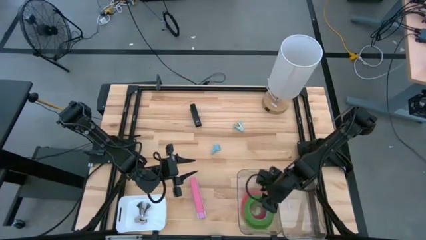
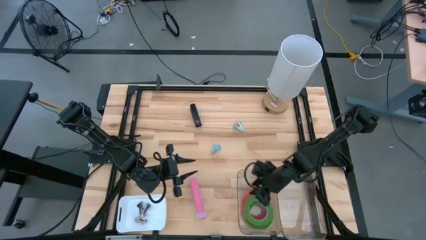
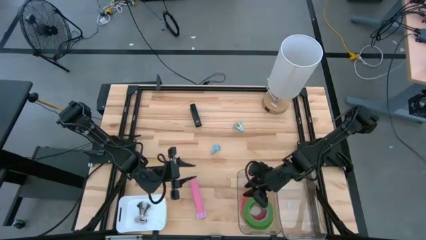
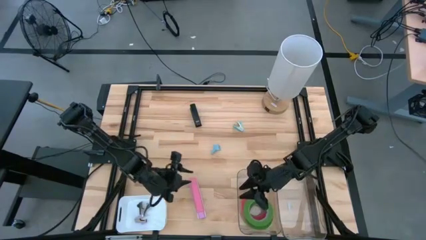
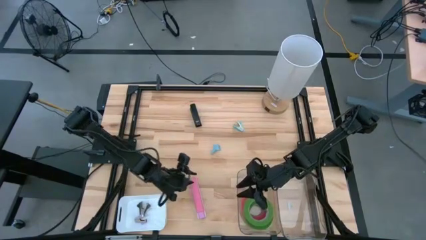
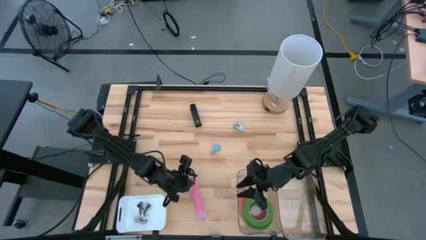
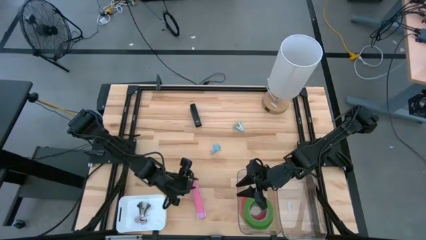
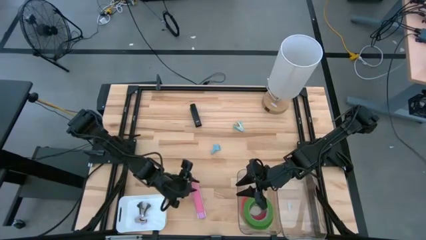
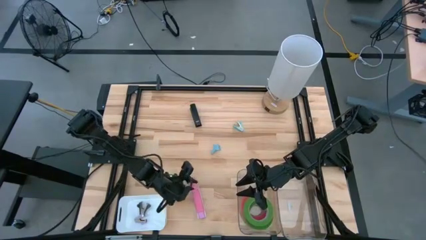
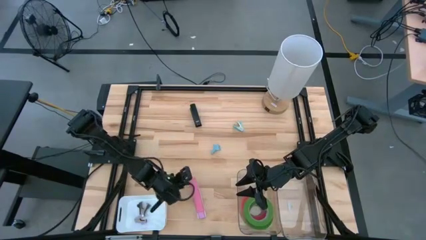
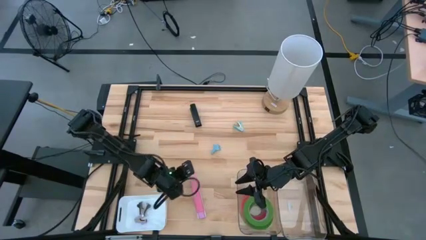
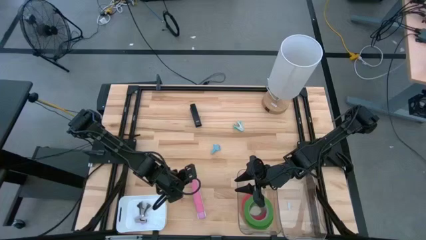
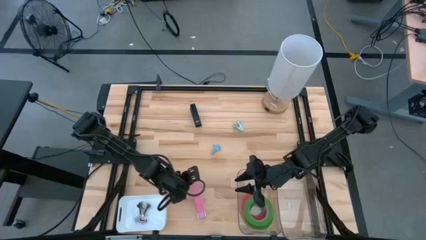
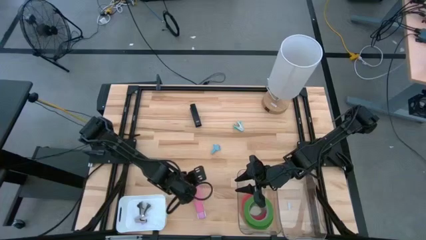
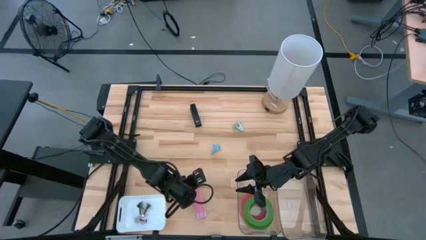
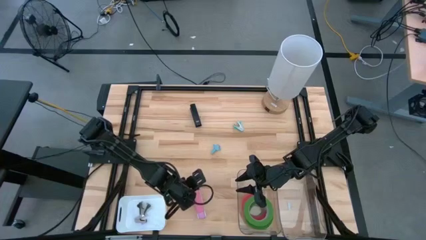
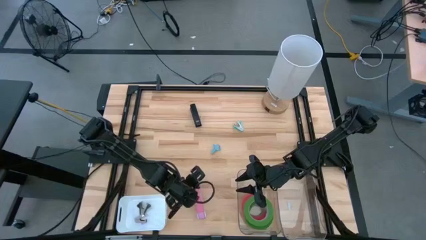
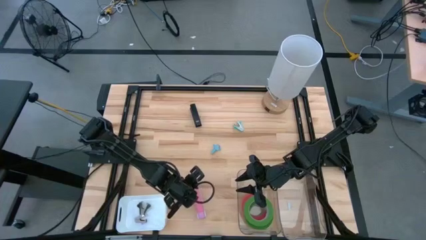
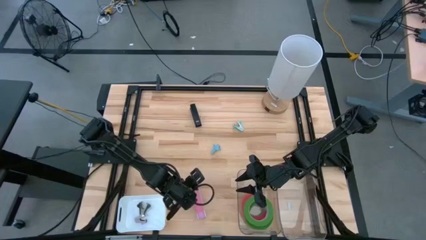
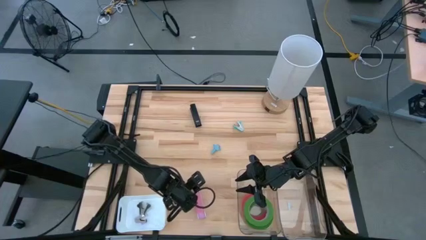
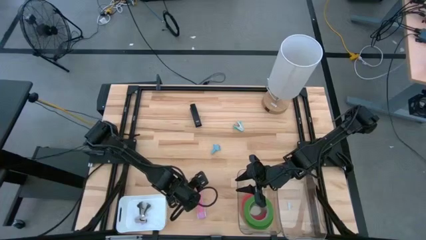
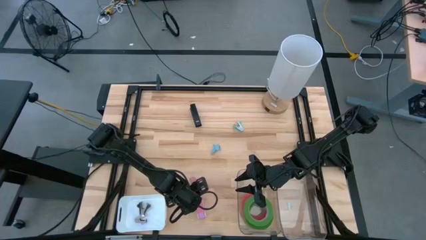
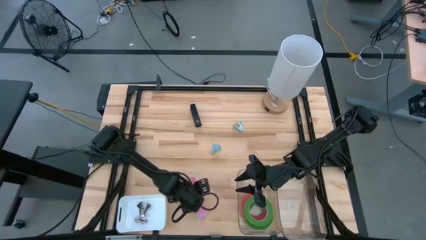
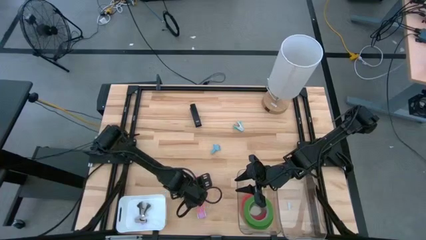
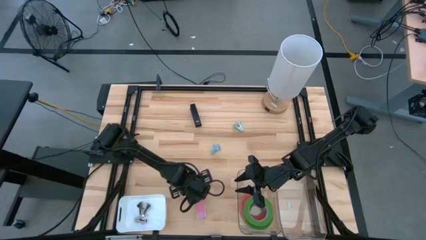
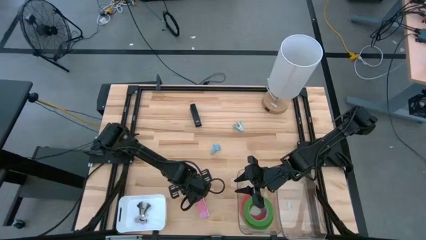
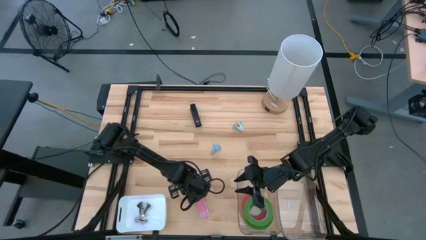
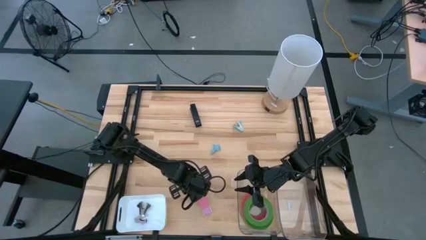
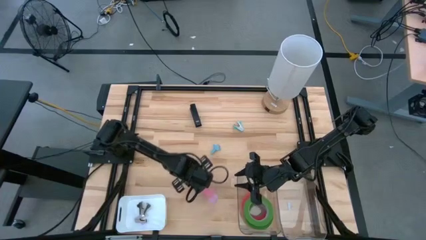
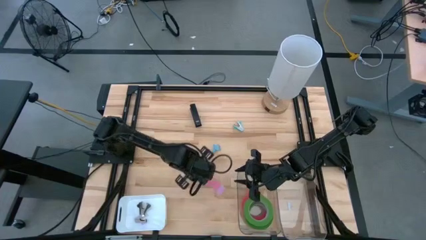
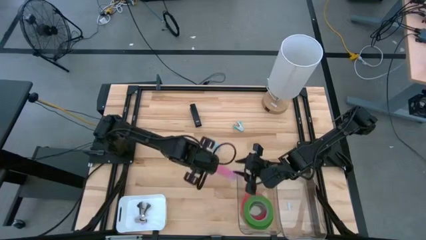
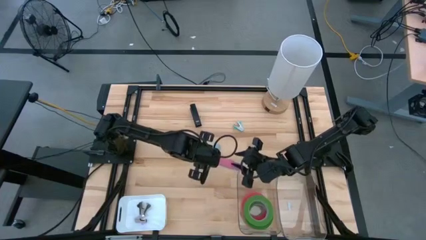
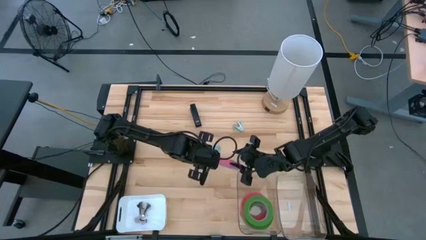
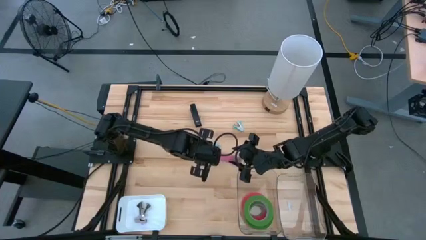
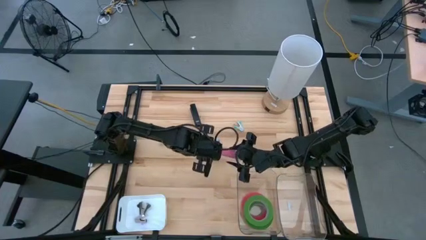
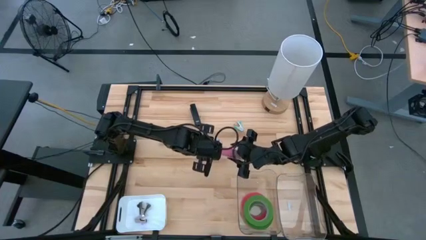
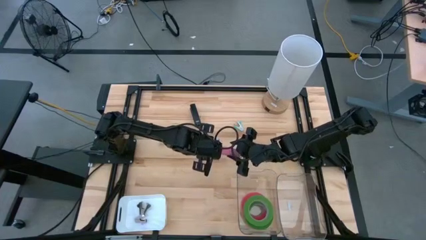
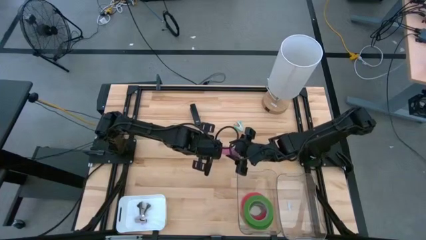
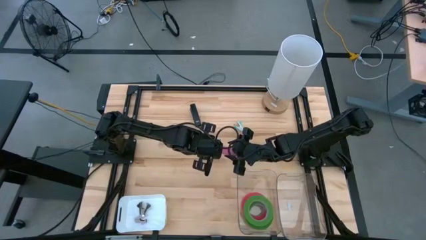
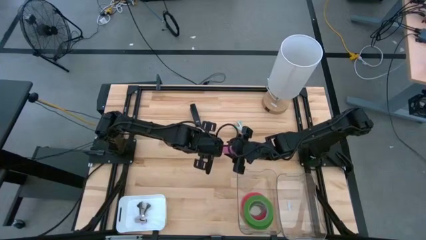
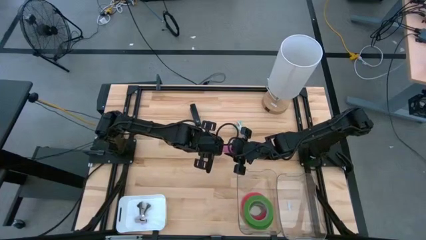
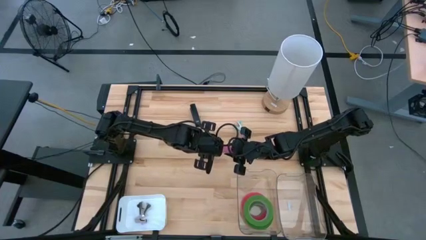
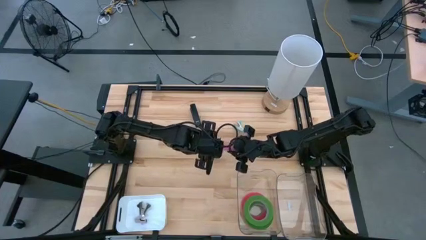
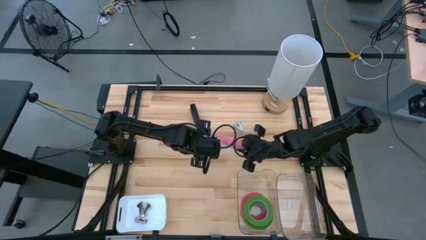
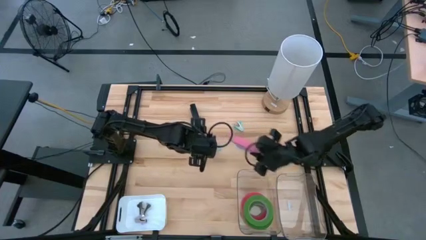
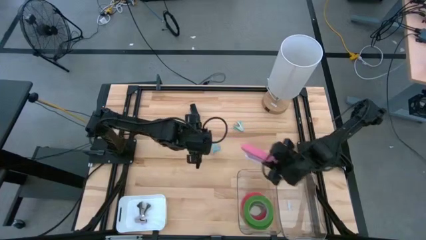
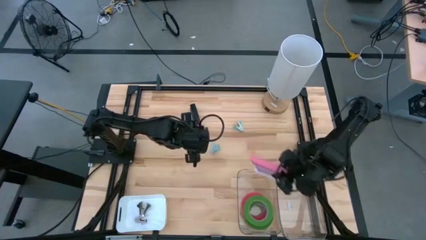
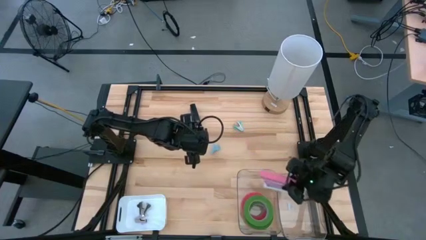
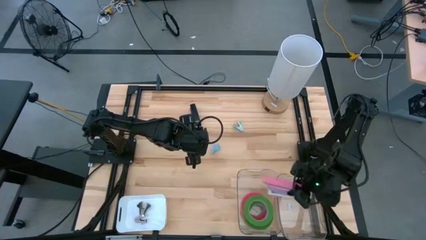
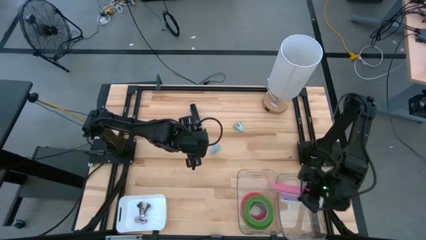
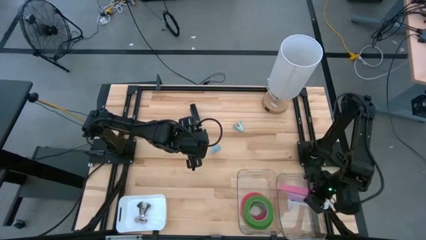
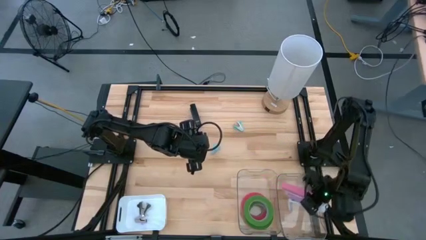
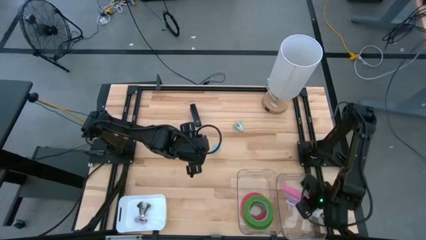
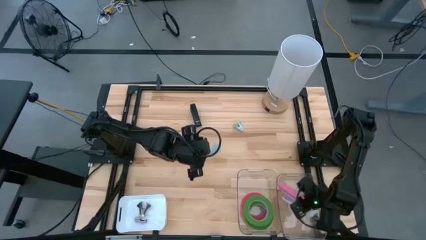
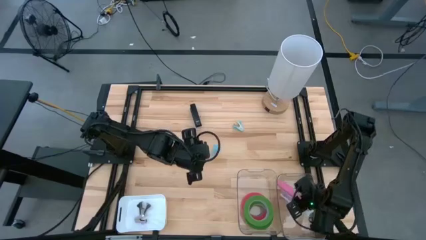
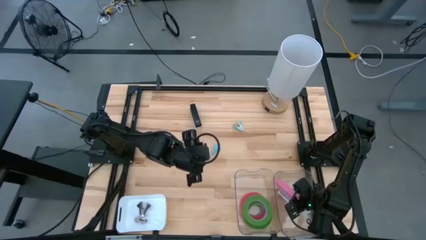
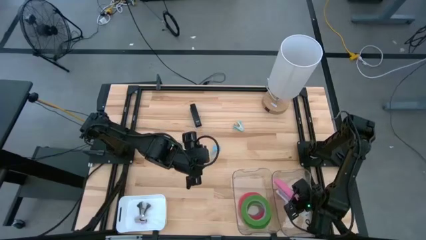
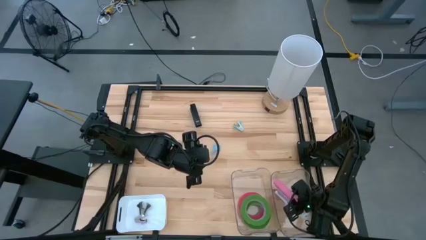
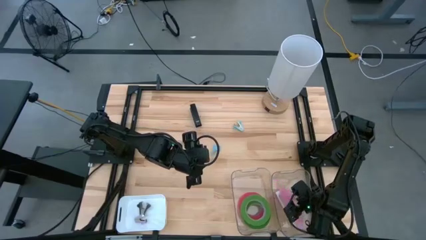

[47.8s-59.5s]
Task: Pick and place Stapler, Stapler remover, tape
Put the pink stapler into the right transparent bin
